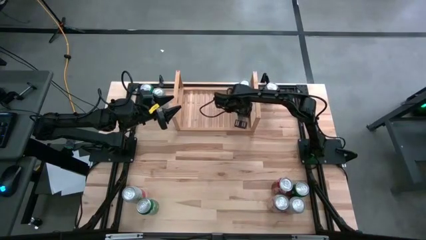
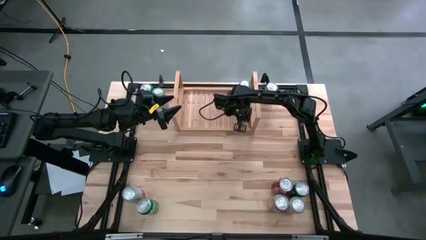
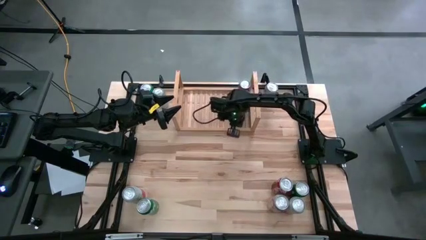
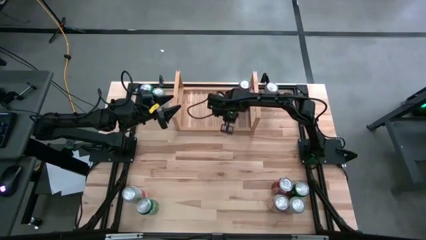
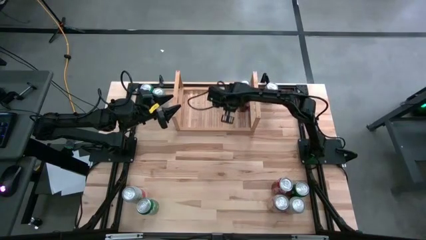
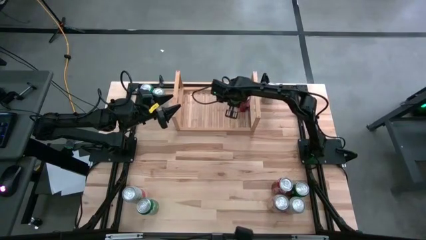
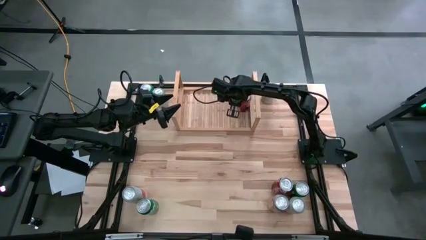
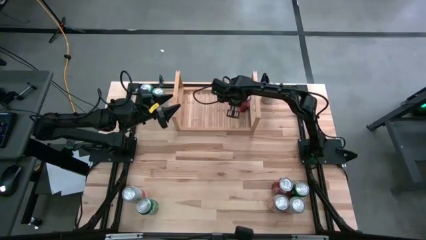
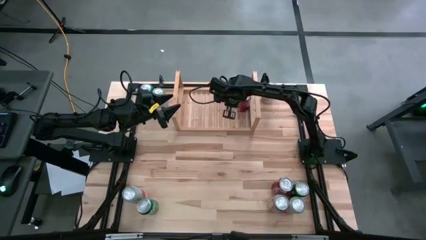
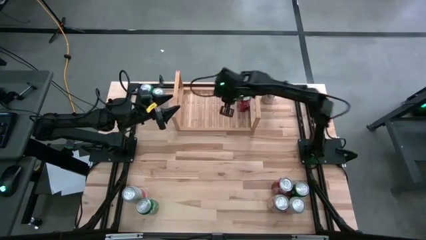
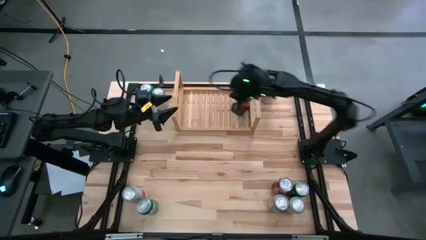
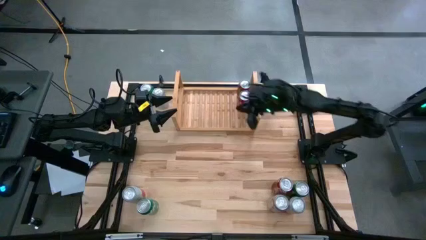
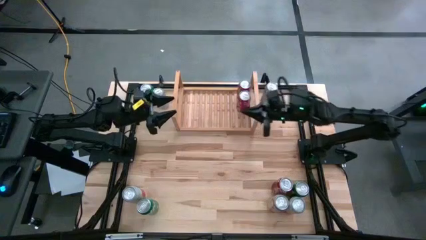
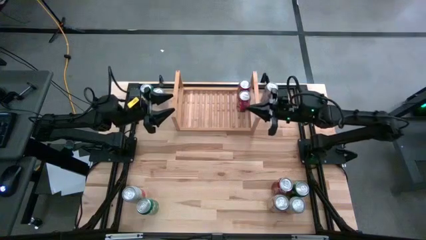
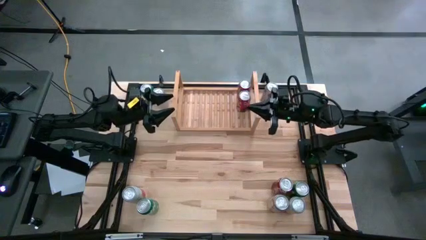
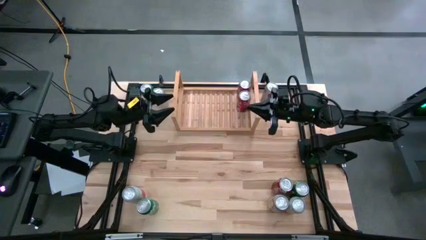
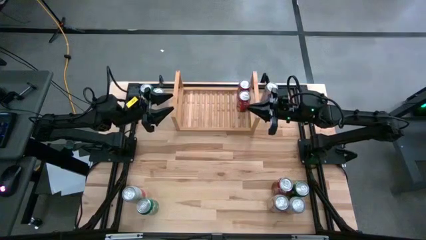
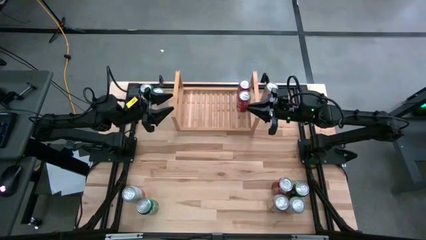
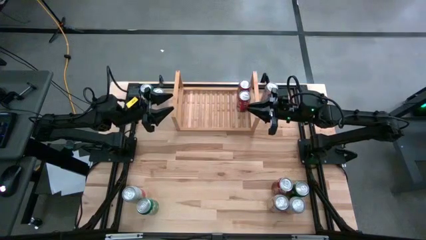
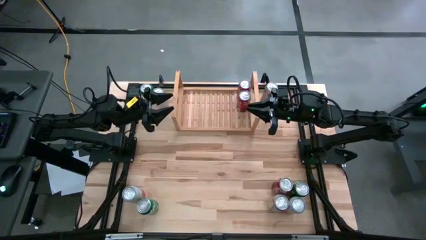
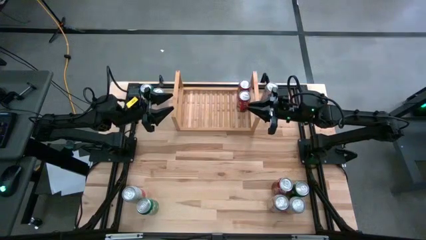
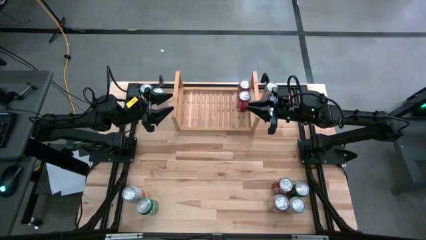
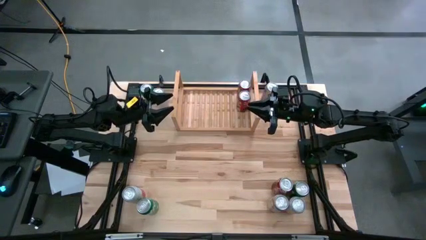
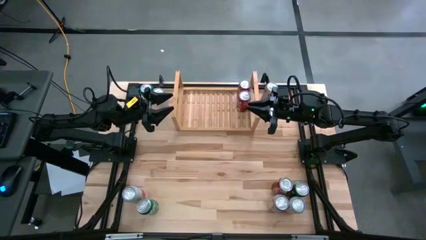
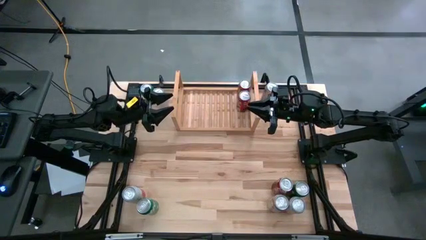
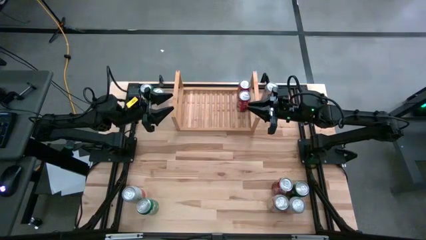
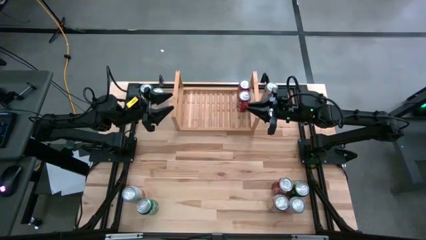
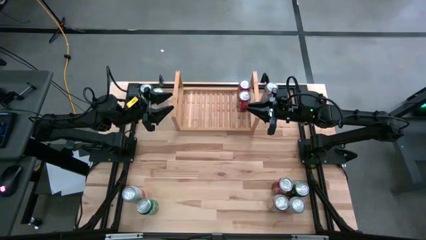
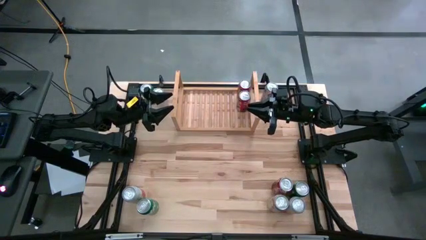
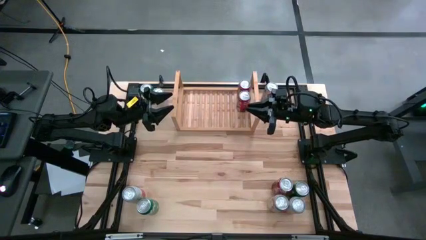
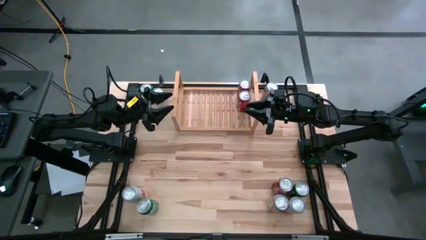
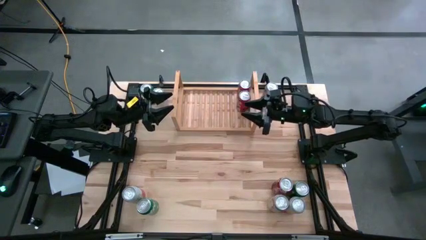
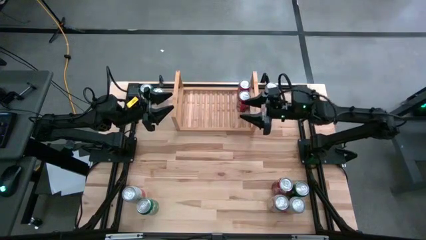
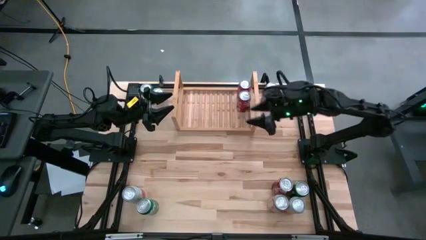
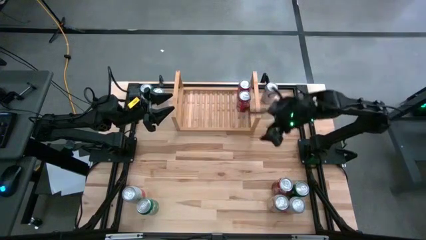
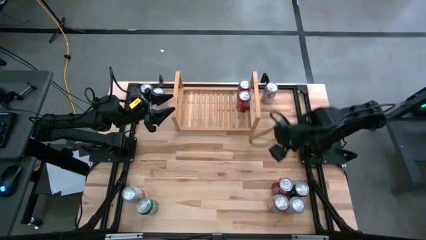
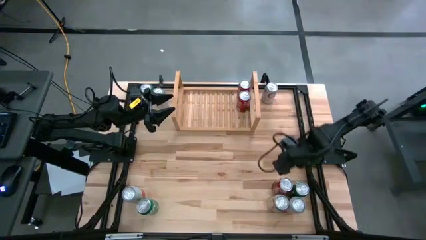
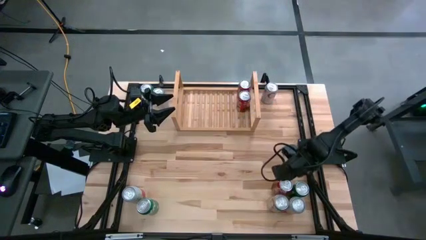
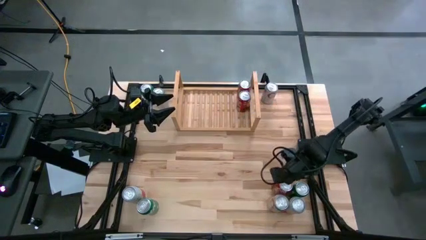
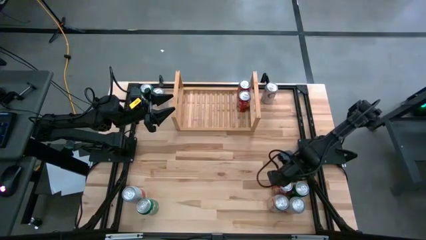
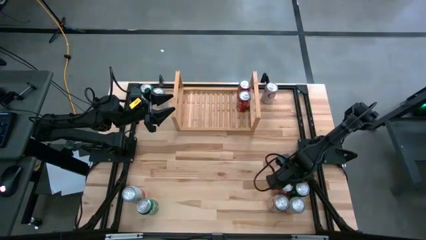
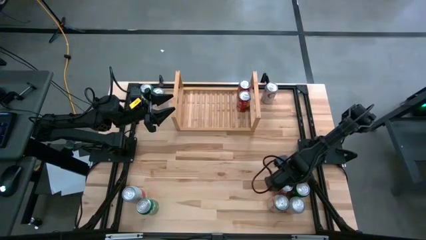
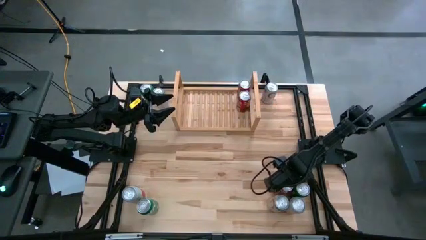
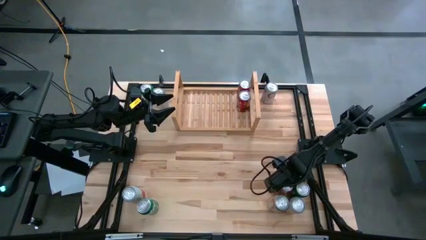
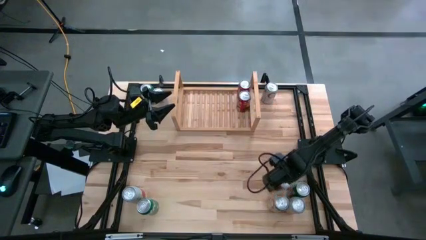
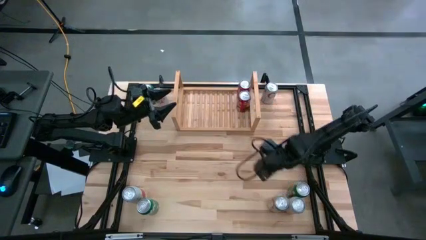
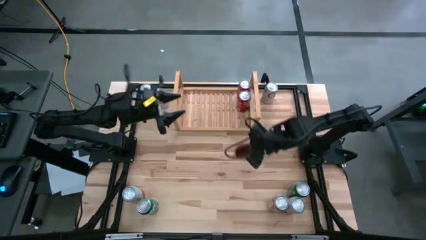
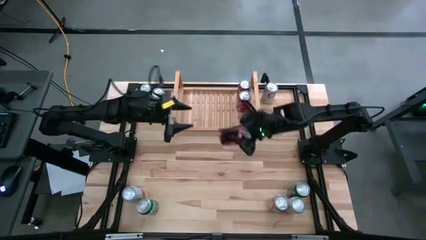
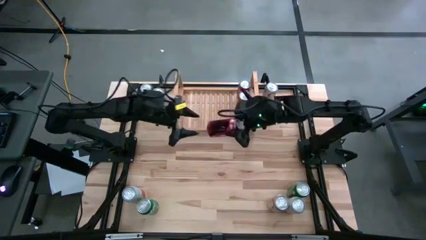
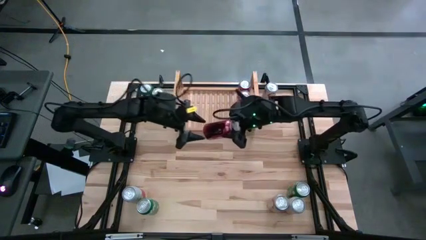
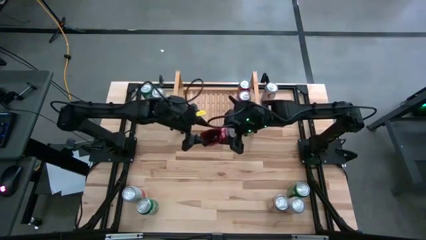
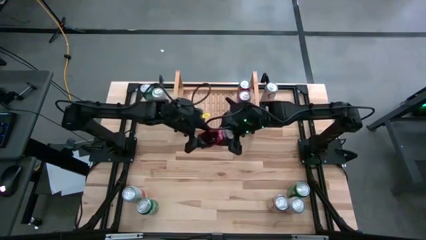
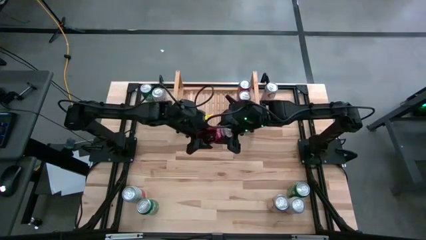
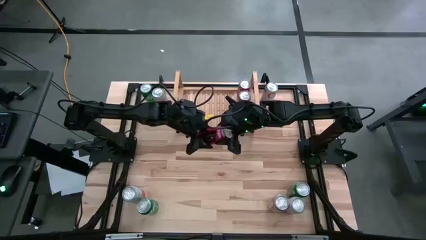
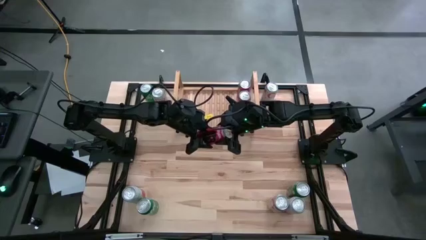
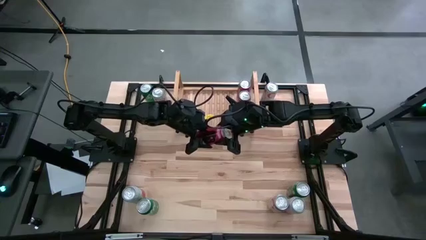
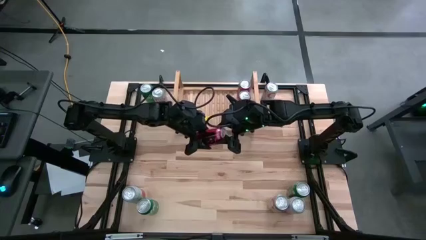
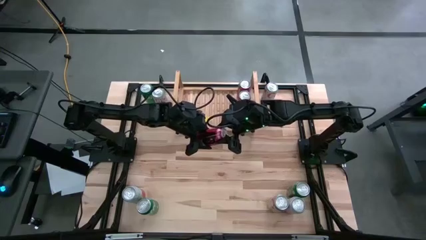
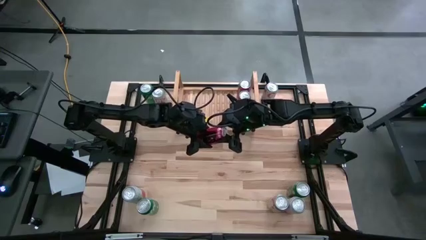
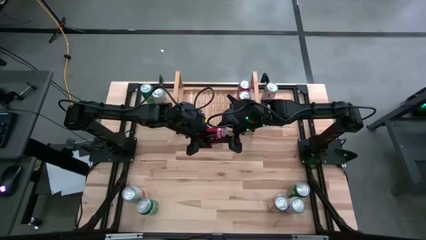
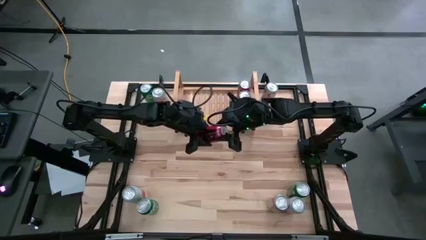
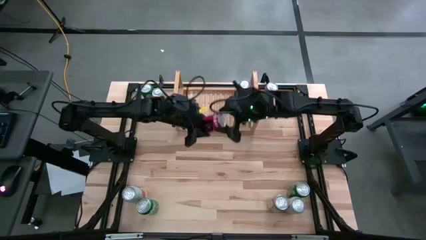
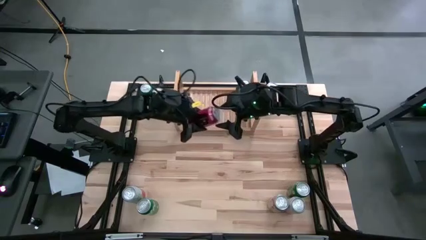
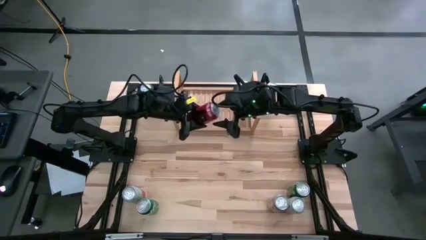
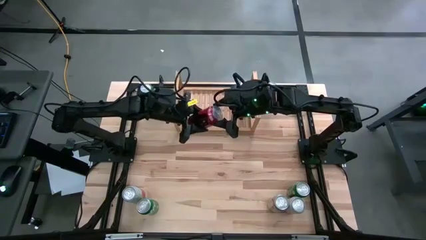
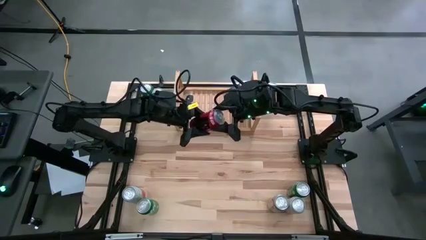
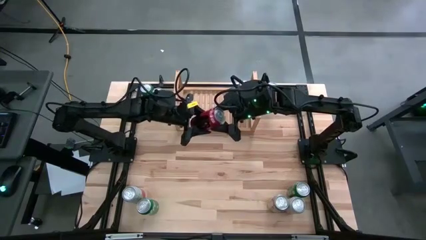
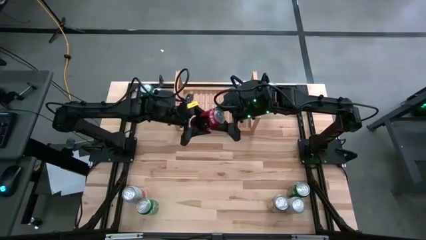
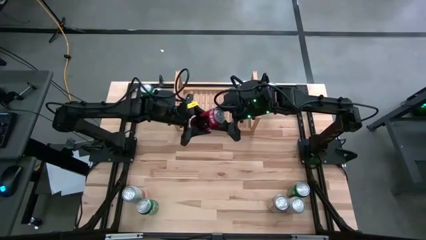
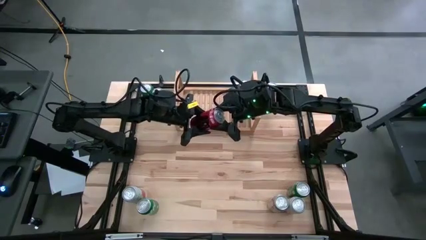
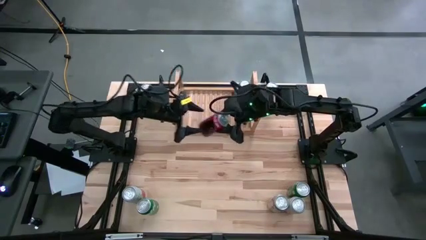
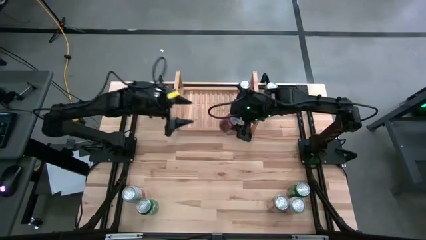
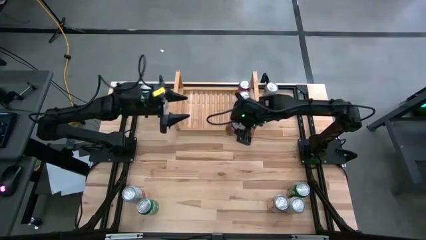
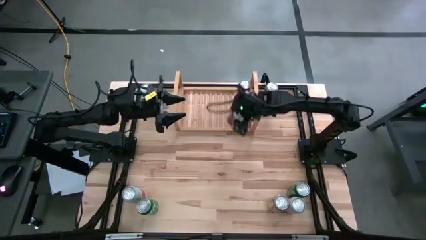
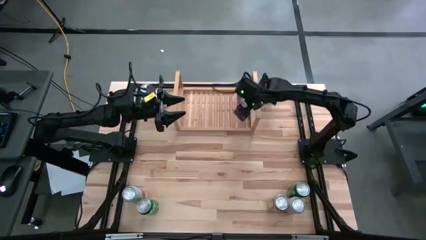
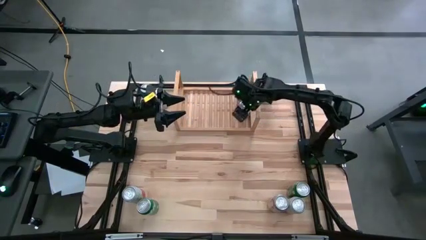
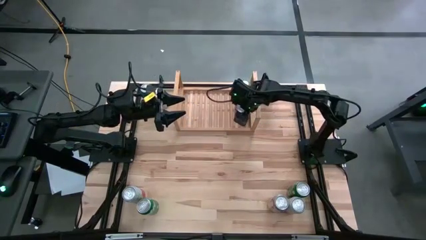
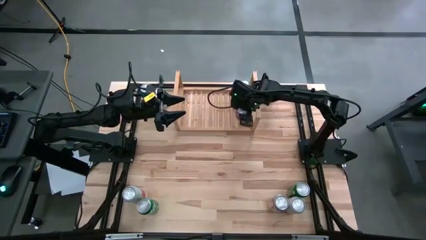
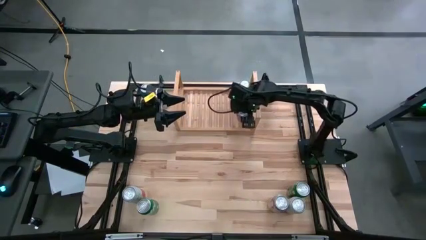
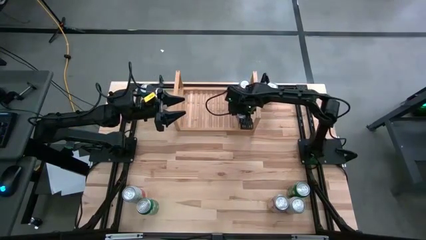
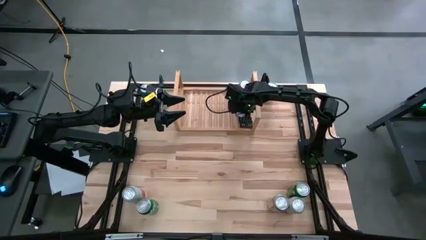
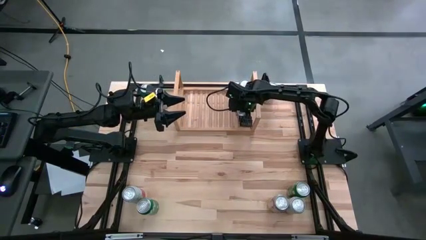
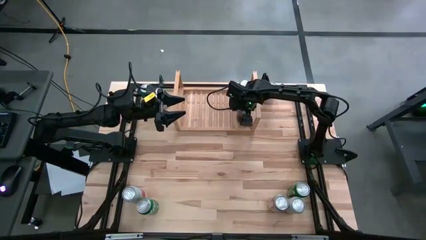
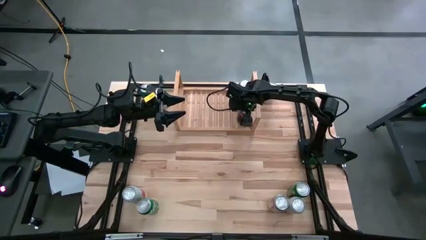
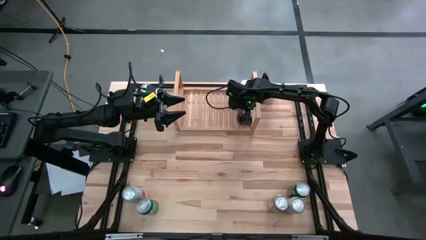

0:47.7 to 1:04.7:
Task: Place canned beverage on shelf
Put the red soda can aligned with the other red soda can on the shelf
